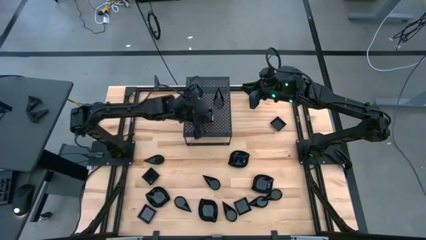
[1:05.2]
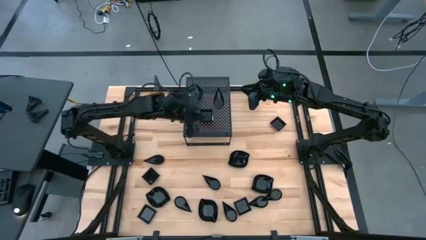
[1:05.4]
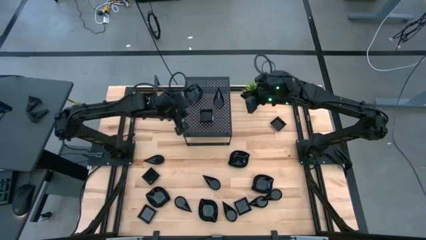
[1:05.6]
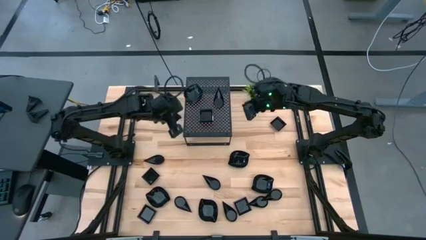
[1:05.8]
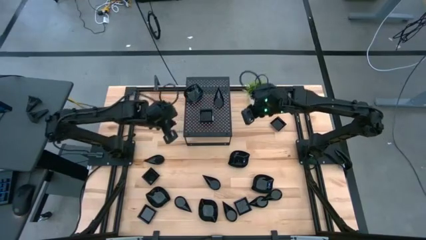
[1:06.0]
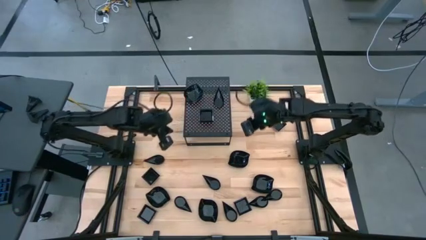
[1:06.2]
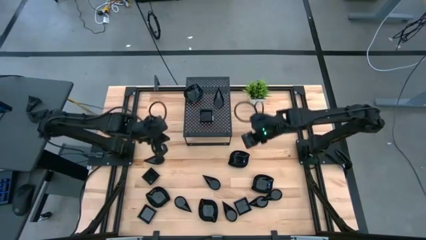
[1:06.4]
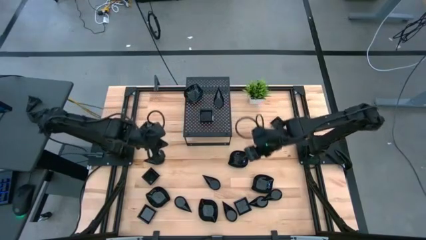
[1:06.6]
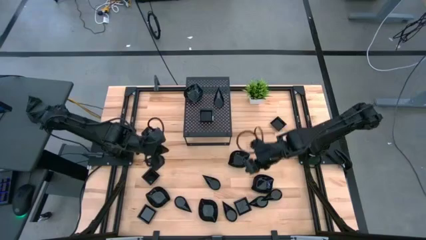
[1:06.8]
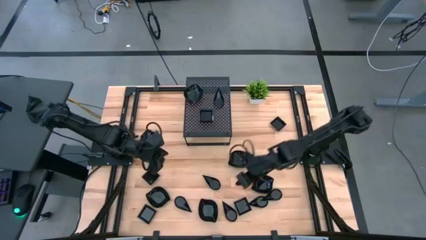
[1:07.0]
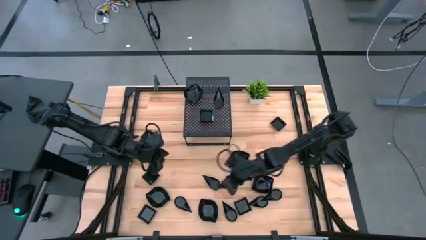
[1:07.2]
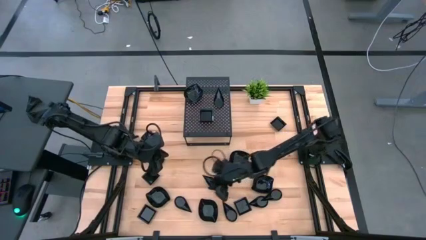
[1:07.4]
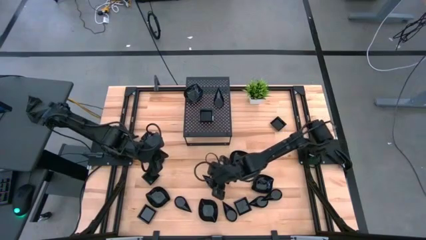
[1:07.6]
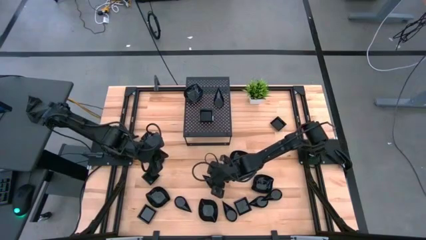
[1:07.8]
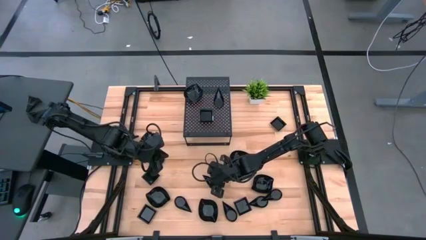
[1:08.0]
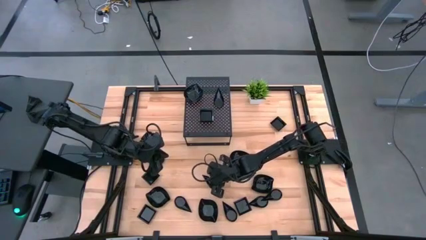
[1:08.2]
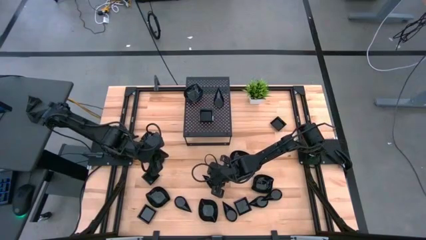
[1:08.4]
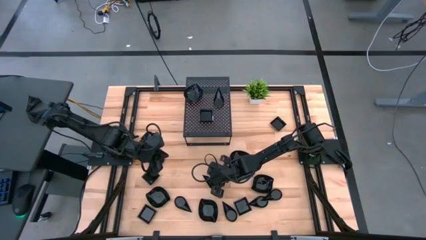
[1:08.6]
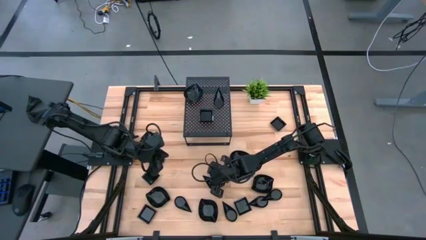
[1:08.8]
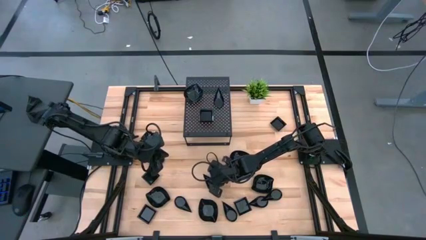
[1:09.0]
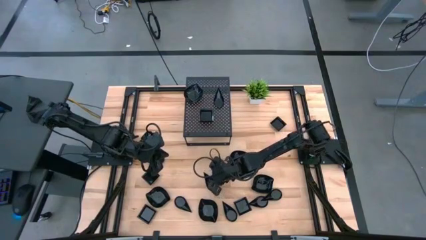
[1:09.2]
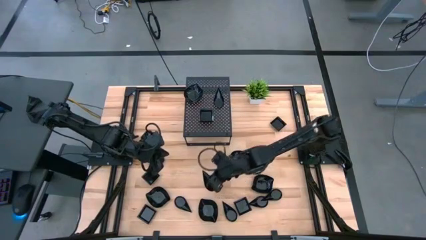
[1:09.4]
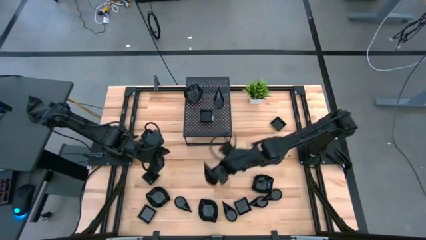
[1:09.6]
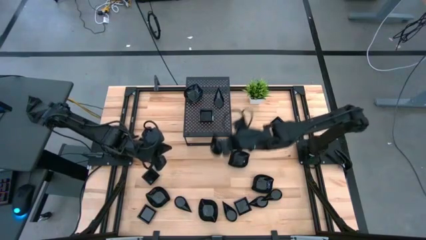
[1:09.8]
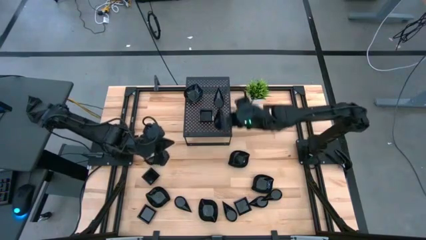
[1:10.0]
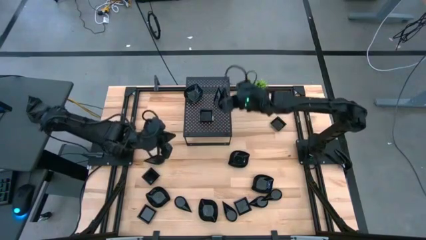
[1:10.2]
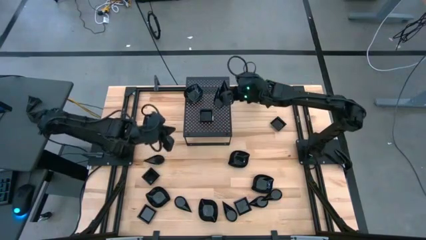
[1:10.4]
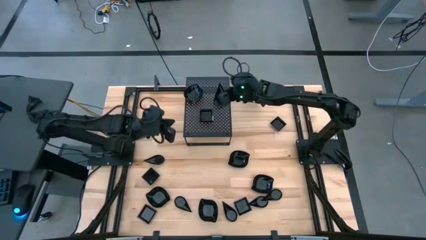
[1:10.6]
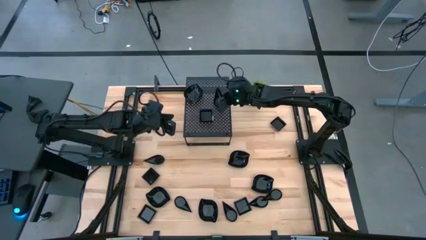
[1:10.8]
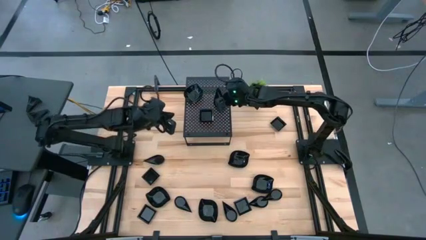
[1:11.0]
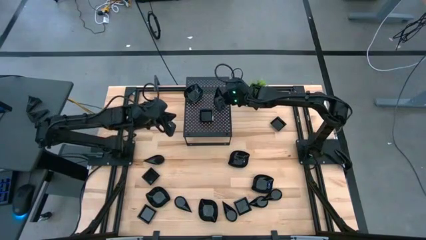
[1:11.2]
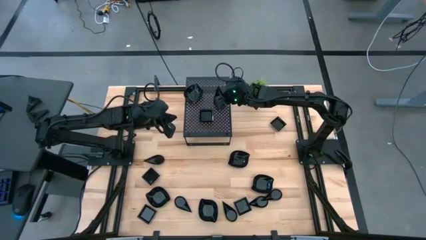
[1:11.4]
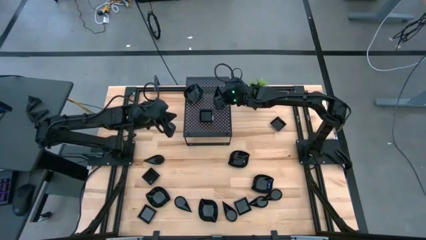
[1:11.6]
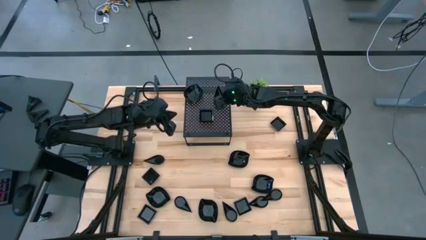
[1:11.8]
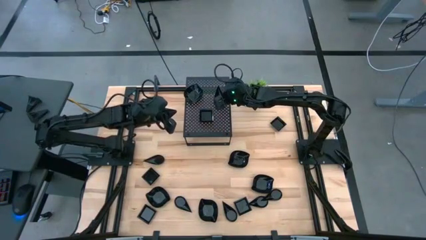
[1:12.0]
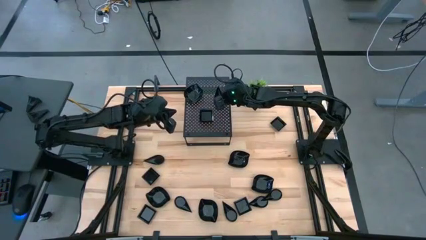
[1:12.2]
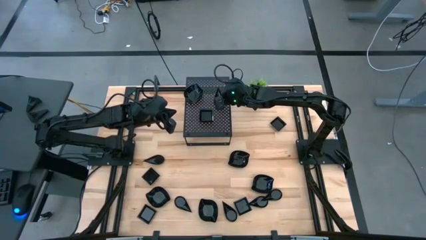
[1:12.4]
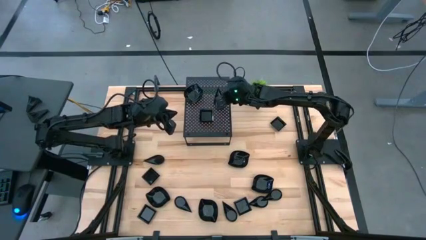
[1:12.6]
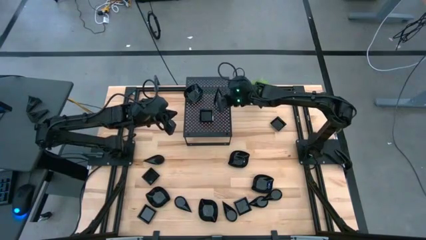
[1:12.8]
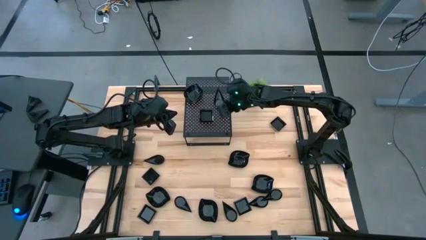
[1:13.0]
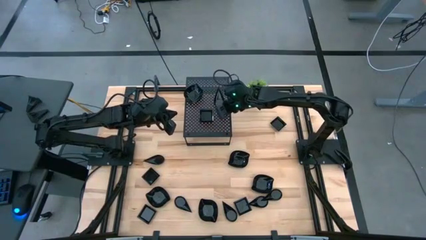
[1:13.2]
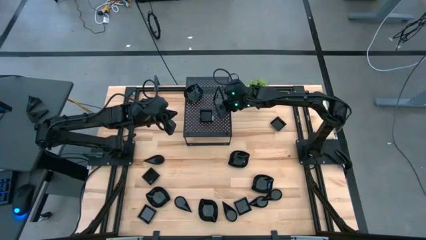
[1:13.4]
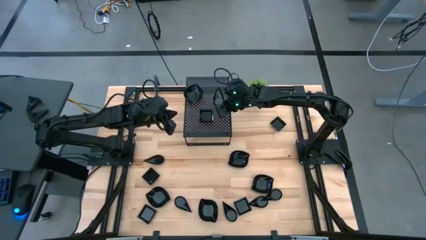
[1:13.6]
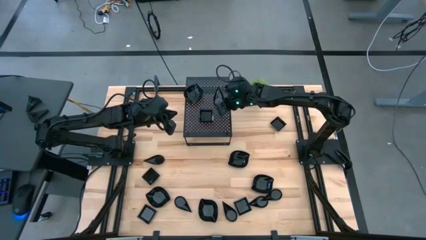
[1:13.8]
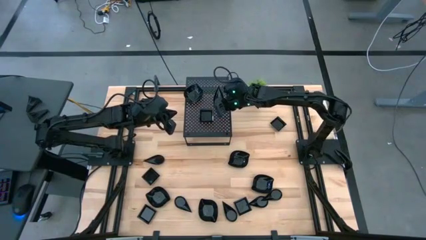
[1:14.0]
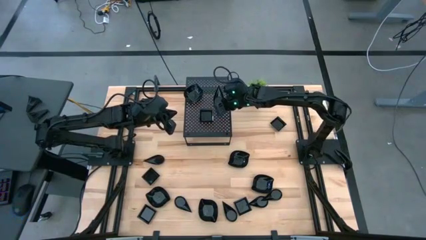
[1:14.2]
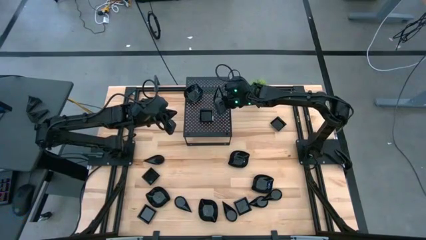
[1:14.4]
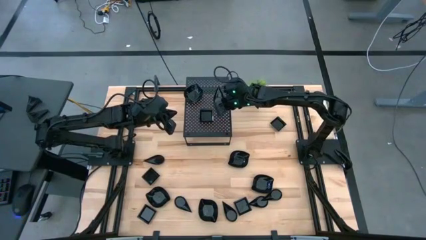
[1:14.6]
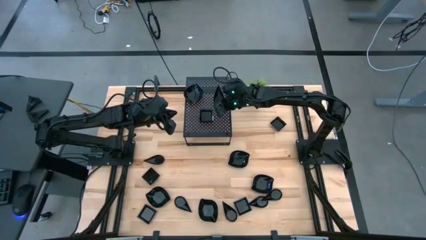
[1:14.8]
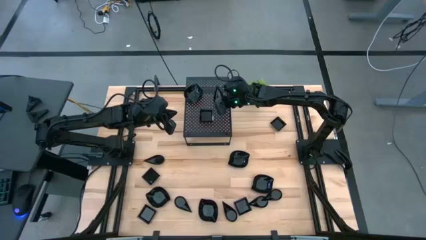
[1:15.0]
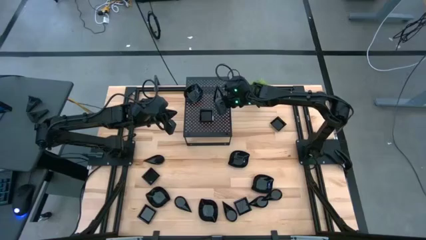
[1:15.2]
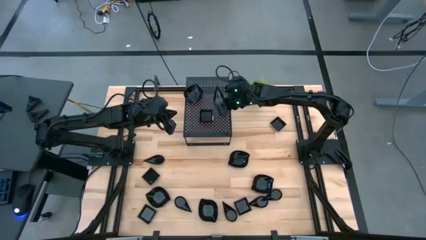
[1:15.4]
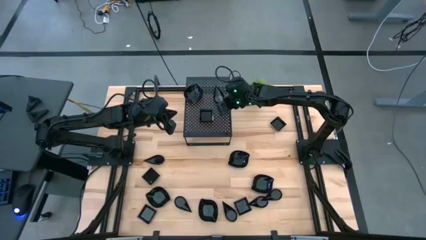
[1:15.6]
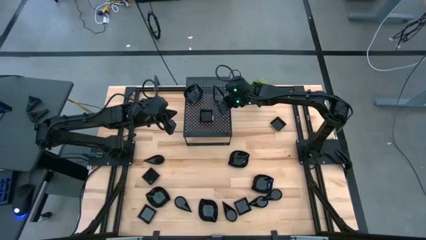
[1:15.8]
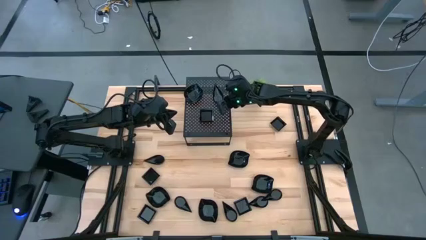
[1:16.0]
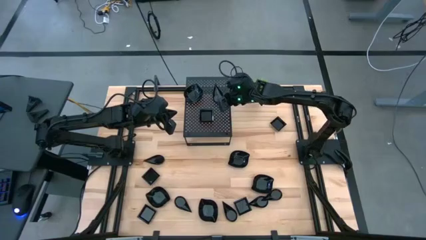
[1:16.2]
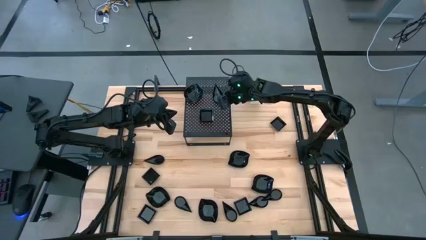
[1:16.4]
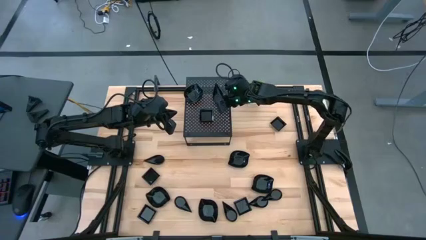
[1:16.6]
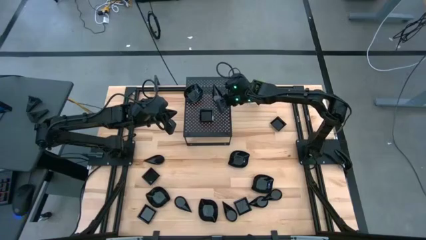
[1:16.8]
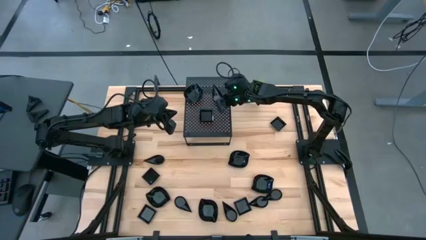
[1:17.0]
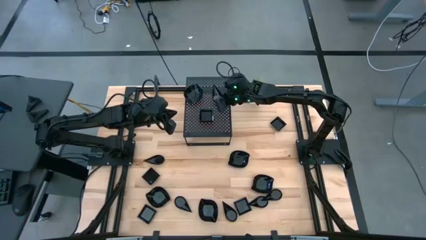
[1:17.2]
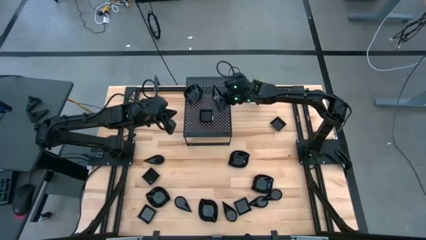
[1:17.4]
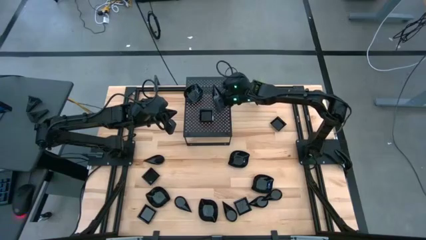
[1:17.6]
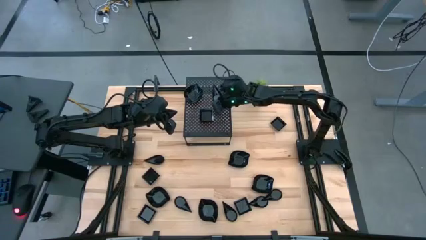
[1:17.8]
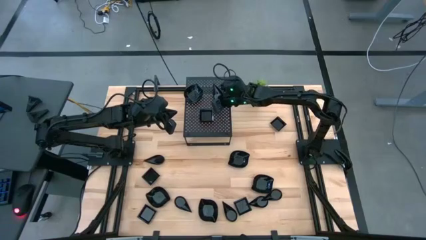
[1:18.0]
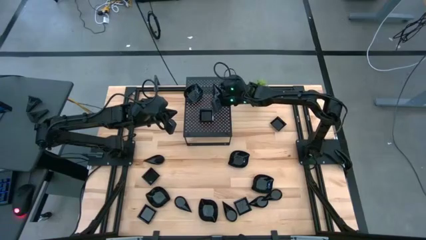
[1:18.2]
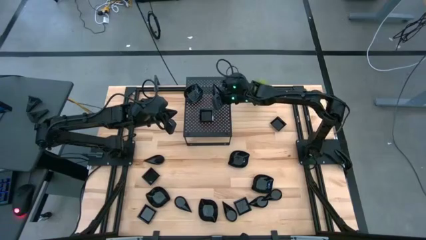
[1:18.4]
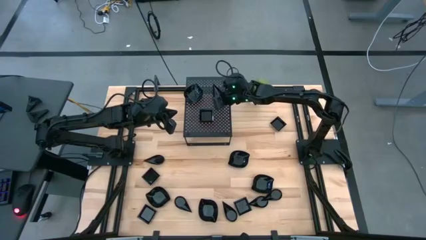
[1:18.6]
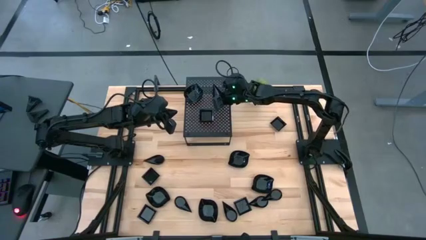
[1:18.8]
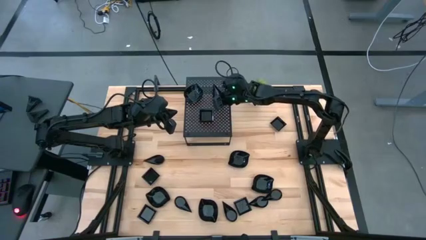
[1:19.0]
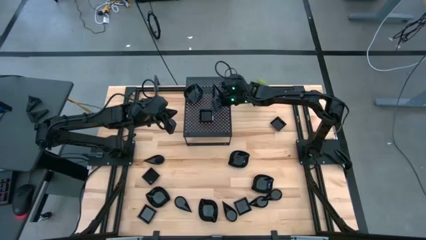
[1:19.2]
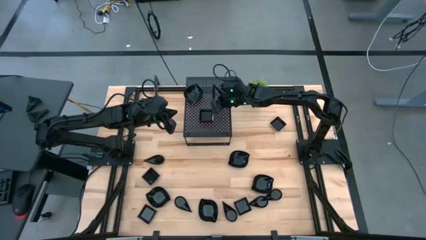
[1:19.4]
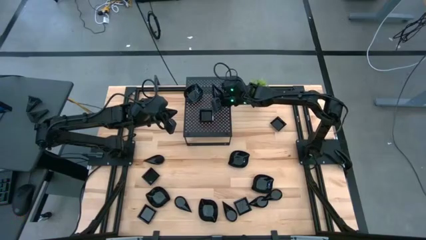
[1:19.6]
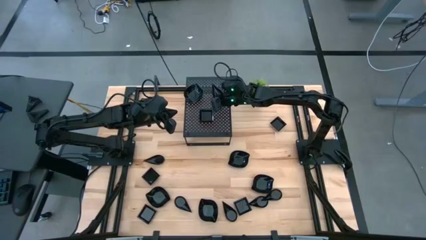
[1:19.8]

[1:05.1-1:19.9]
Task: Pick & Place Mini shaped plates
Stack the drop shaped plate on top of the other drop shaped plates on the shelf
